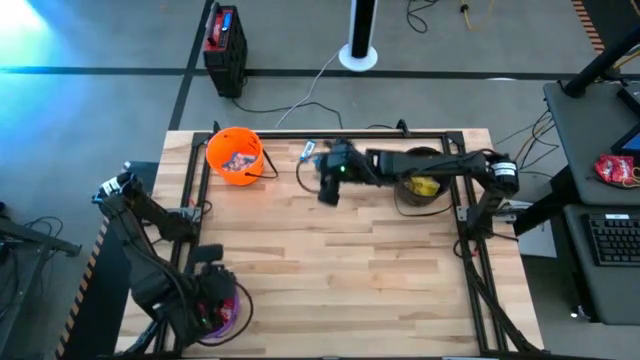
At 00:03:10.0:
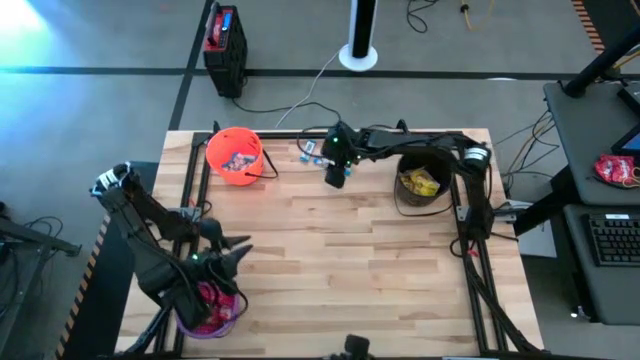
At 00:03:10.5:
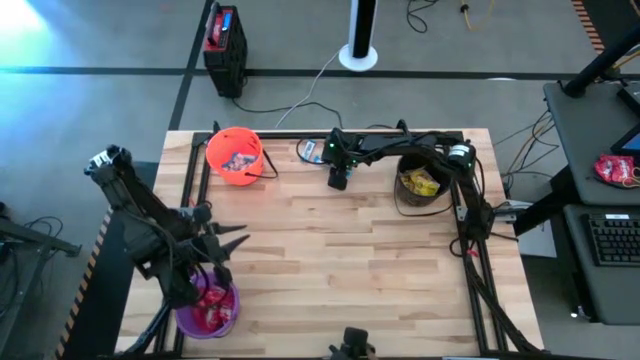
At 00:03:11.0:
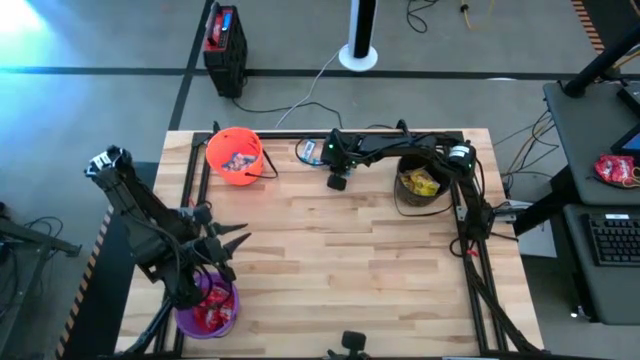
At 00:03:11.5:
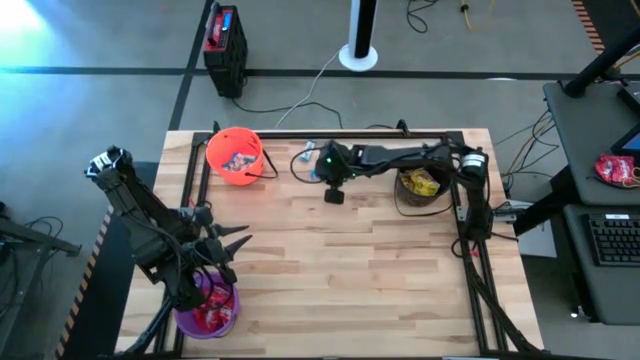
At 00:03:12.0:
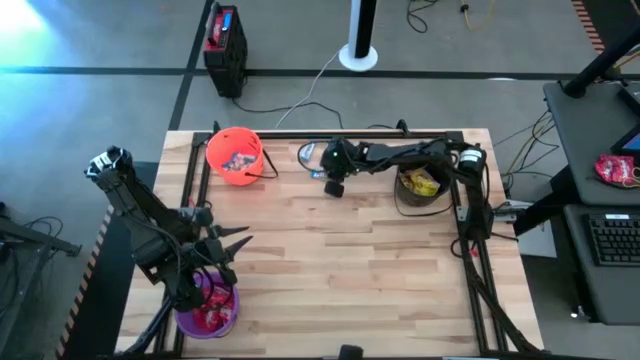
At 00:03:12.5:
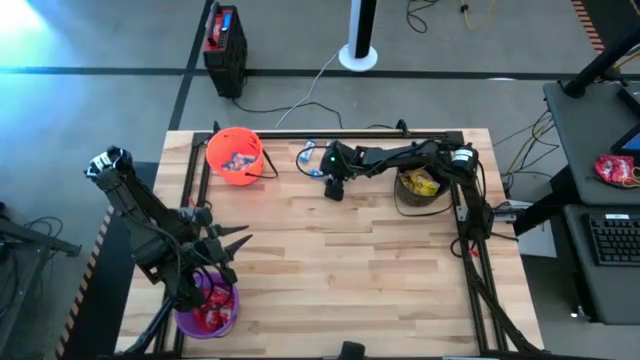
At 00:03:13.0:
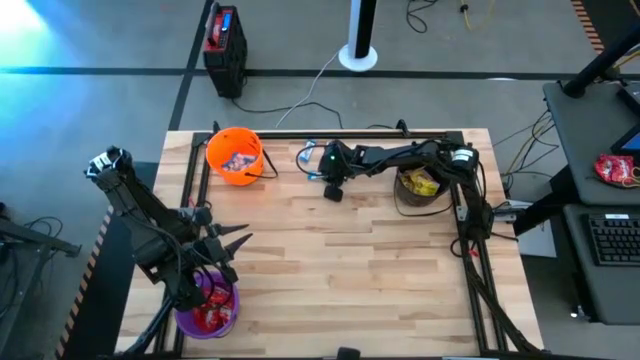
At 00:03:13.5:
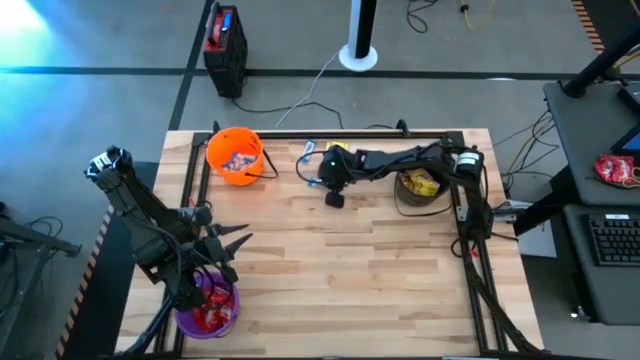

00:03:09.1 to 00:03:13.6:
Task: Sort candy by brand, put in halloween buckets
Put the white chocolate bar into the orange bucket

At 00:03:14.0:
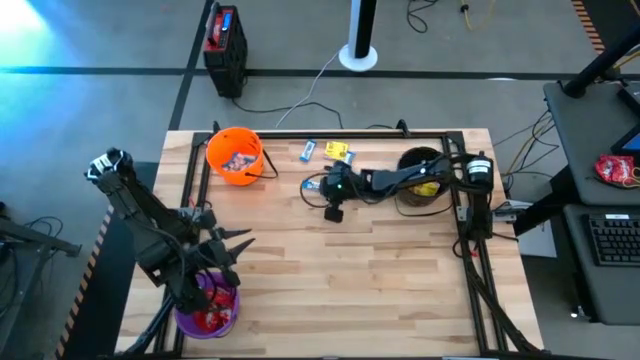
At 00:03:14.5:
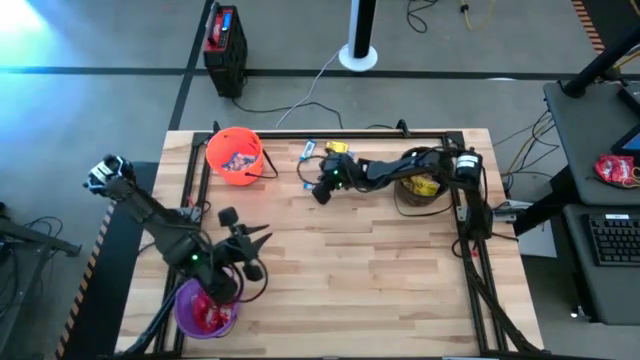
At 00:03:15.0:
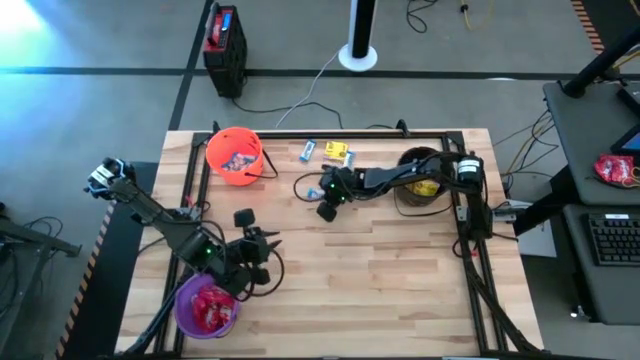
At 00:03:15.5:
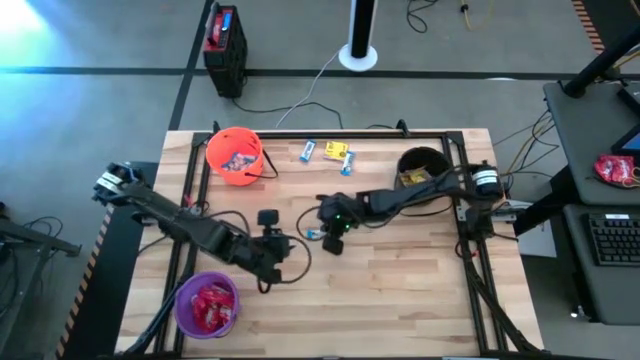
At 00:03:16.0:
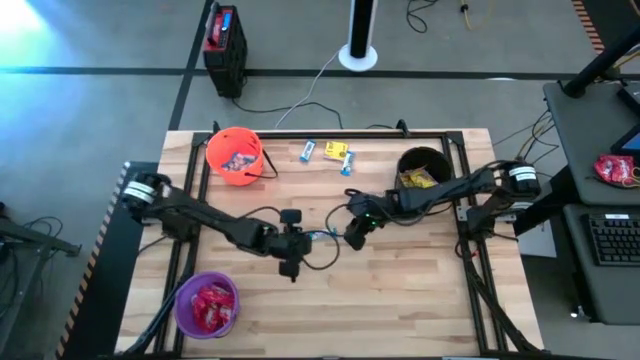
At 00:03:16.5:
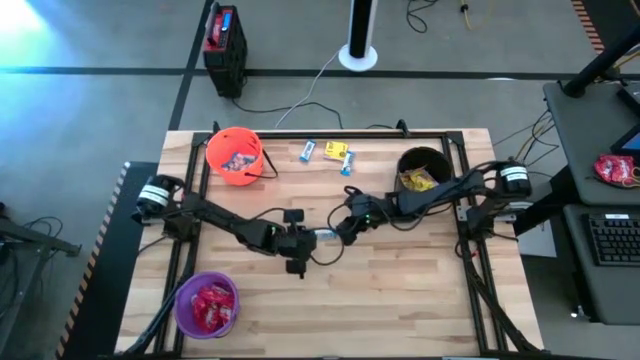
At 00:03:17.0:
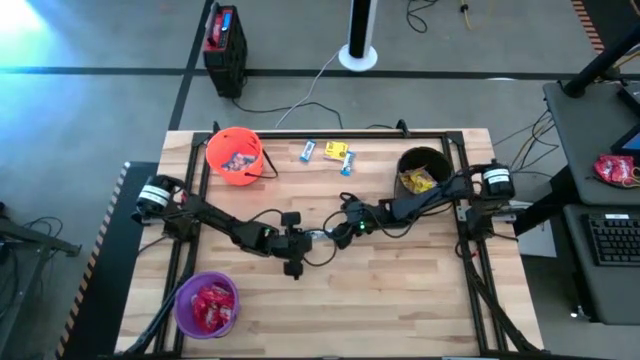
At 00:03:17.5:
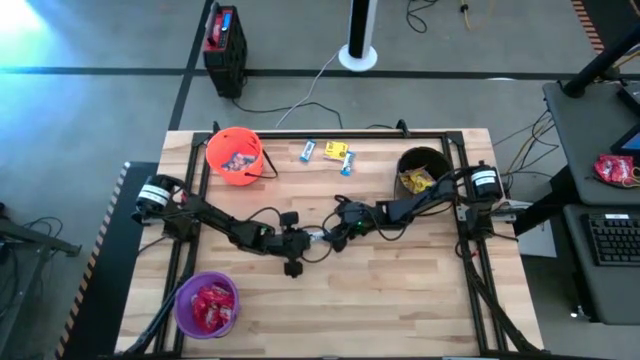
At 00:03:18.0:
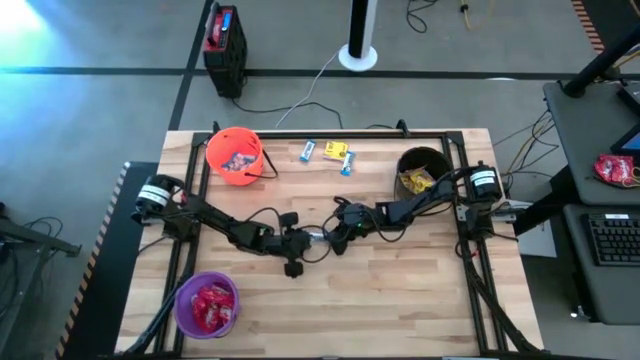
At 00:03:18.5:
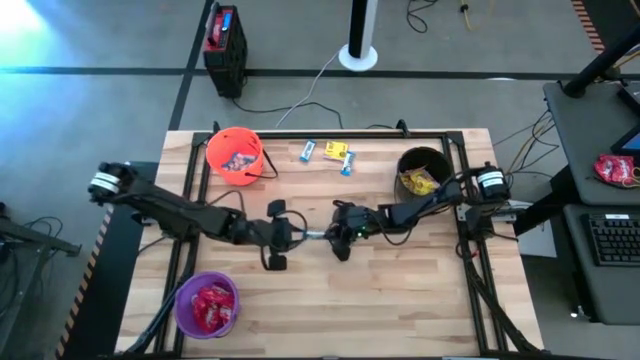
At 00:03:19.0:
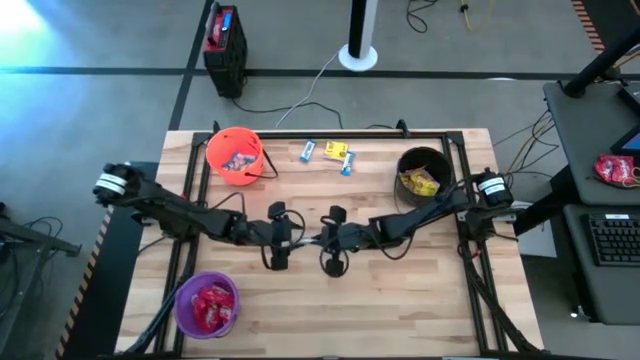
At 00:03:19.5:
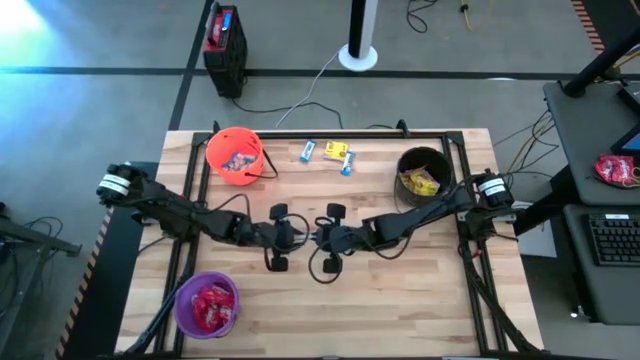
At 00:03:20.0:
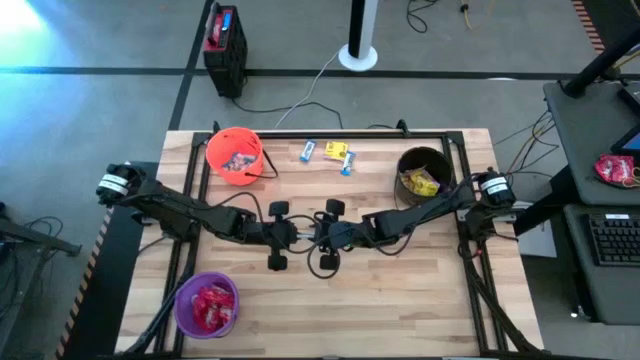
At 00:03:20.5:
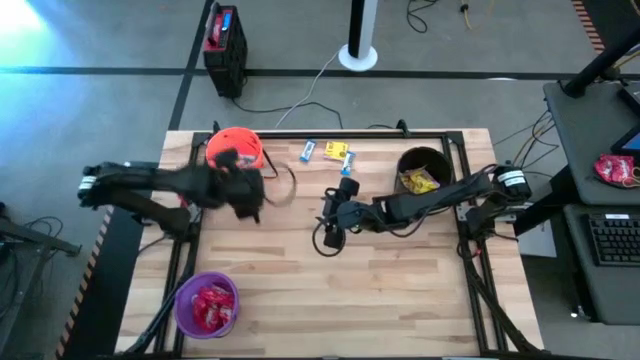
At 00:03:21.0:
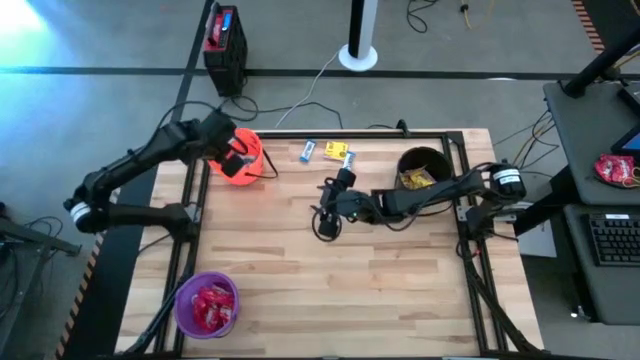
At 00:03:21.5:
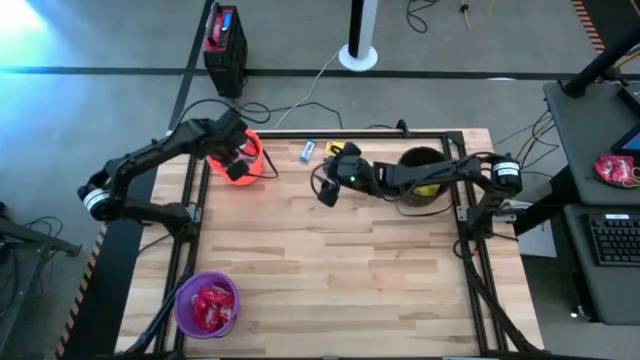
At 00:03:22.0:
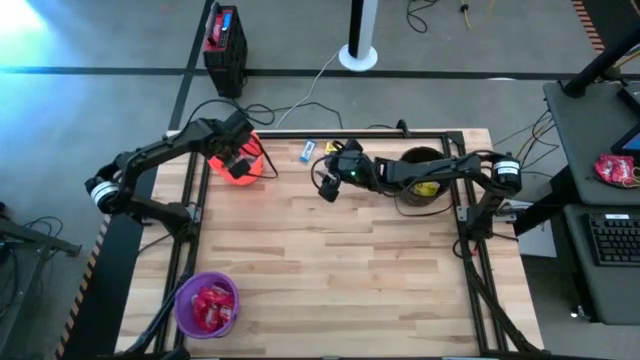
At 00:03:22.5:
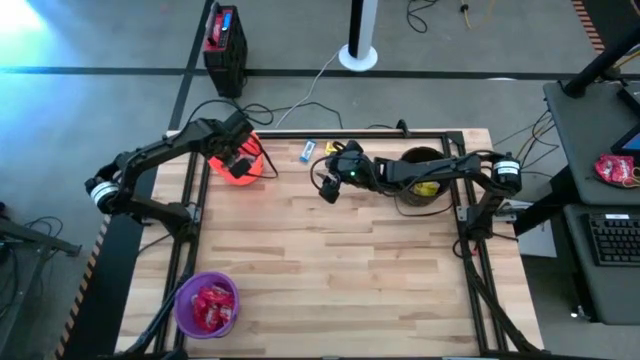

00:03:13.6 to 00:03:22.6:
Put the white chocolate bar into the orange bucket

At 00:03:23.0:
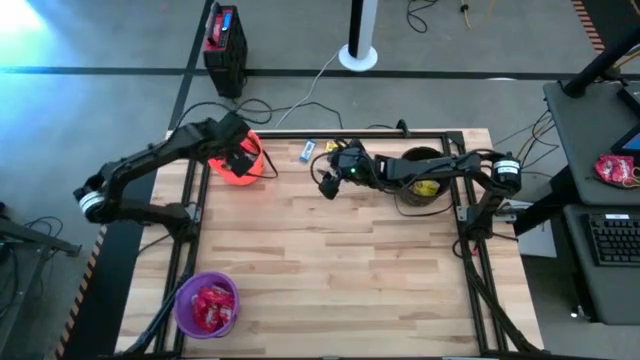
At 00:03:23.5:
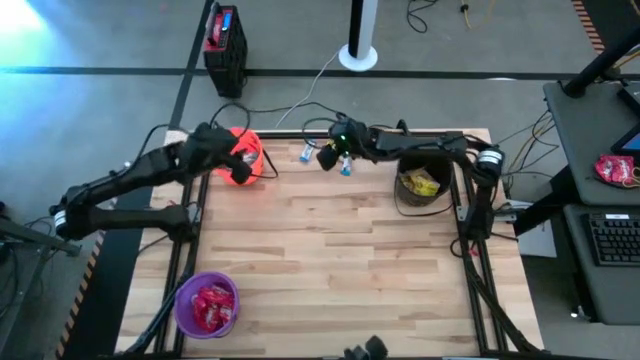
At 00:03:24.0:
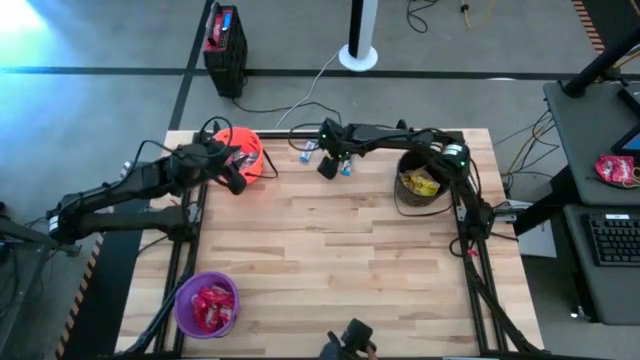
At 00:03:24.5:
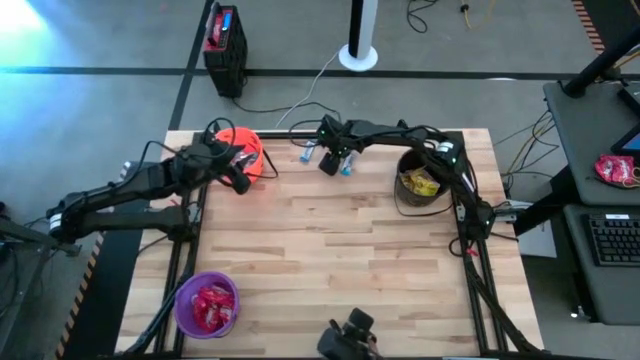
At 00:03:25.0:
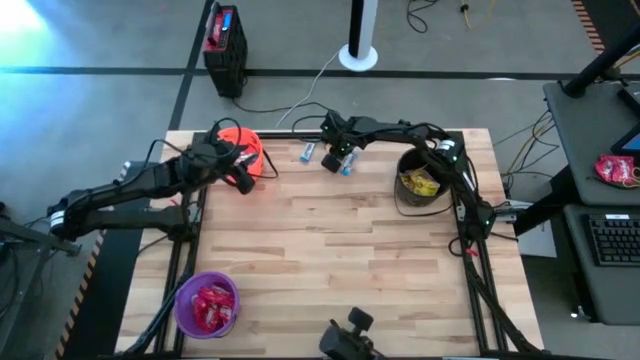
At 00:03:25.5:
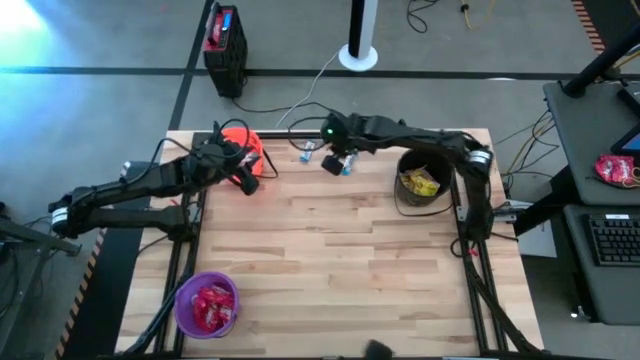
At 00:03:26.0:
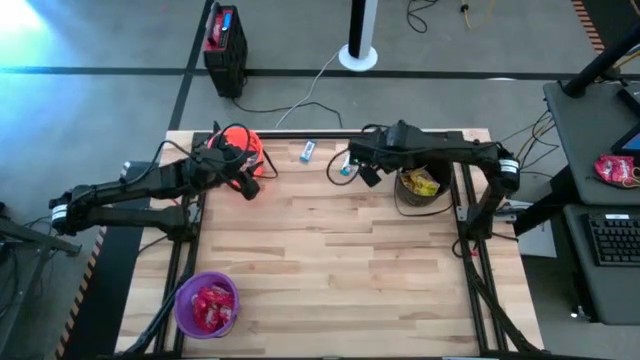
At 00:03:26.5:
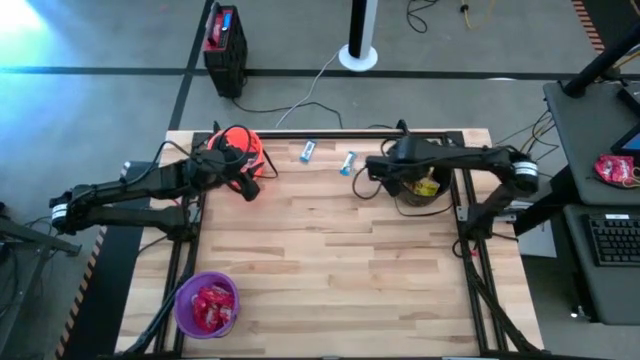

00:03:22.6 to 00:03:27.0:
Put the yellow candy into the black bucket

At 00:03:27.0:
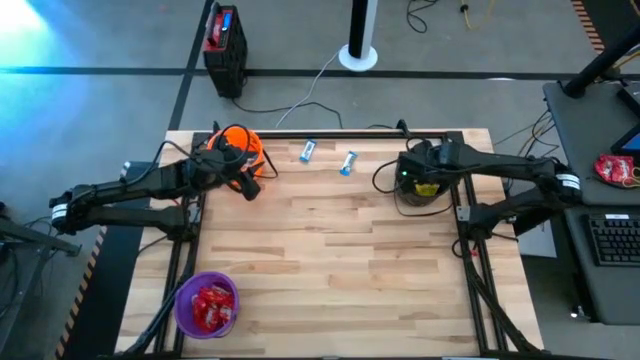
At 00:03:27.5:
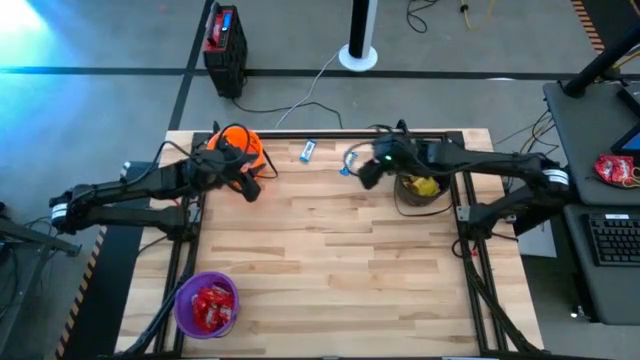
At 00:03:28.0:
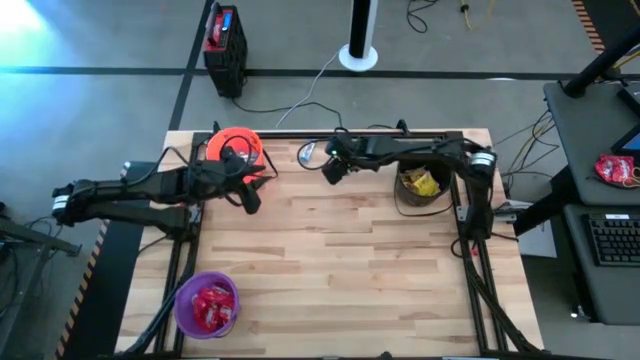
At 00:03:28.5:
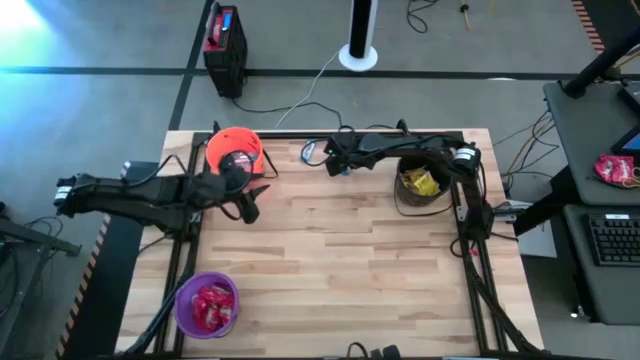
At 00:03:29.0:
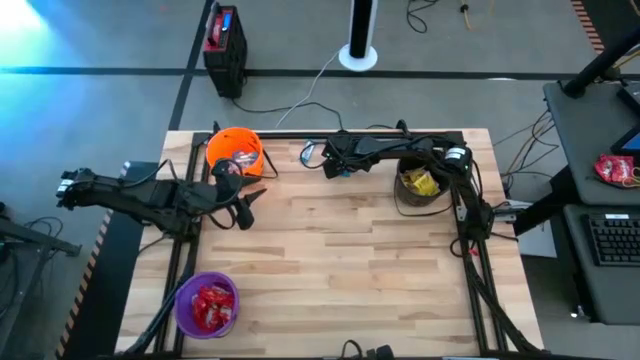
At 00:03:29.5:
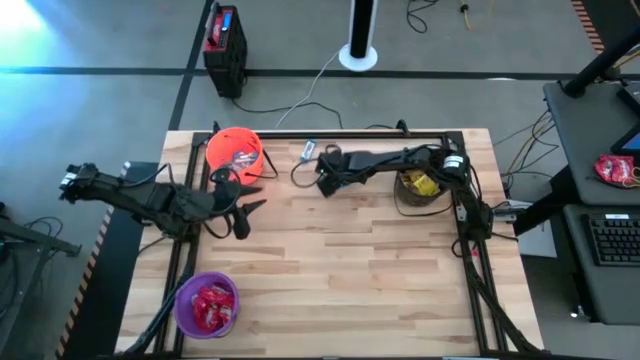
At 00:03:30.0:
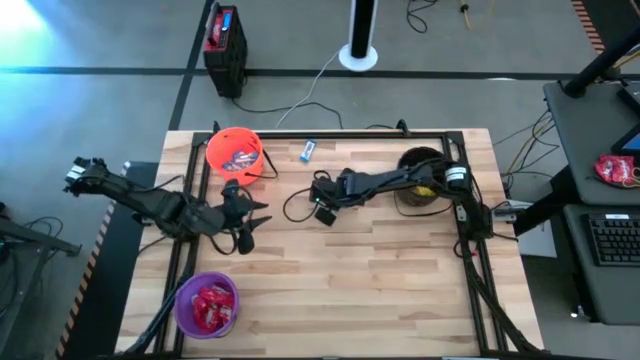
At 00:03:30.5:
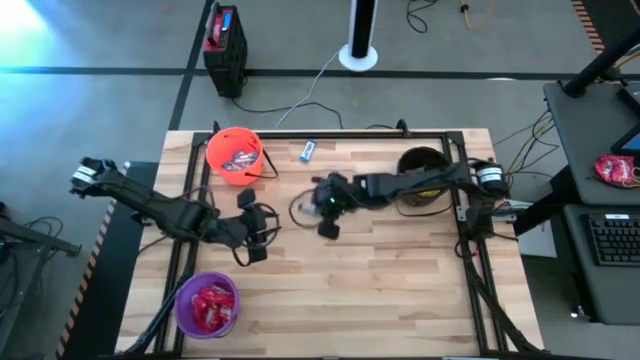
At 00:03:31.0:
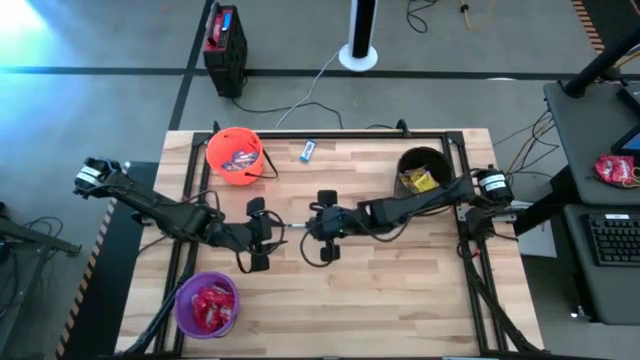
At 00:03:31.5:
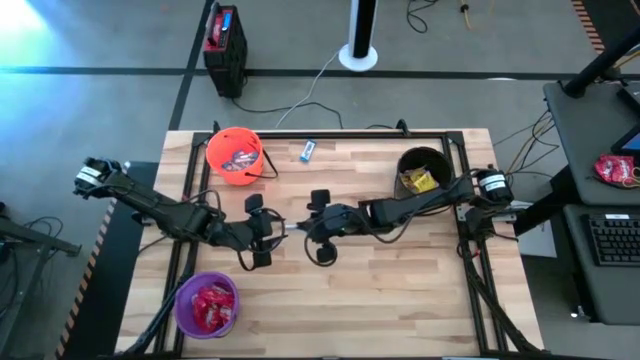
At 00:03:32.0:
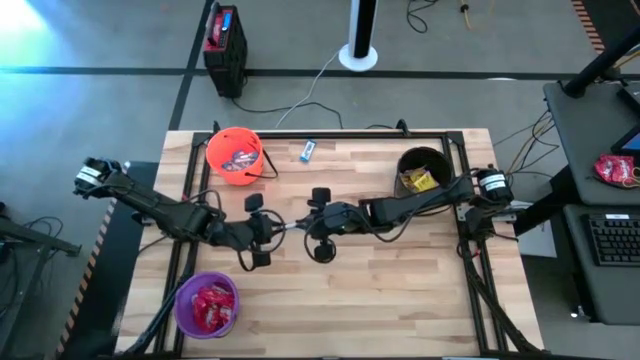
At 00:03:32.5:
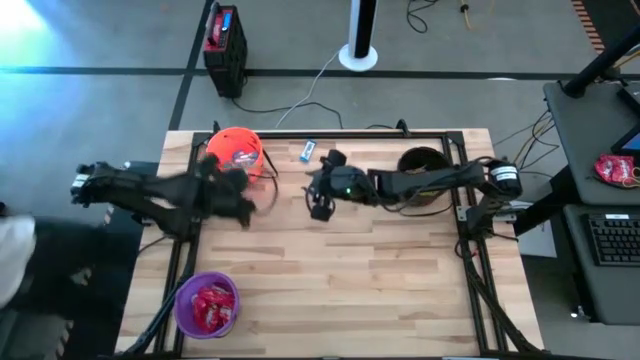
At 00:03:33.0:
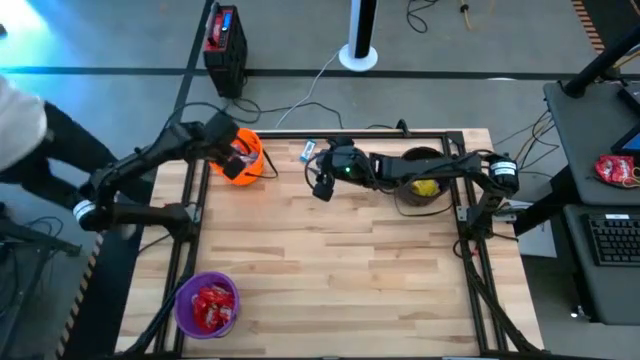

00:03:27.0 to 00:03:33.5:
Put the white chocolate bar into the orange bucket
